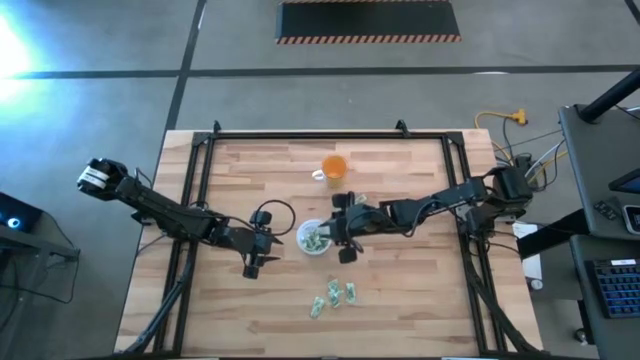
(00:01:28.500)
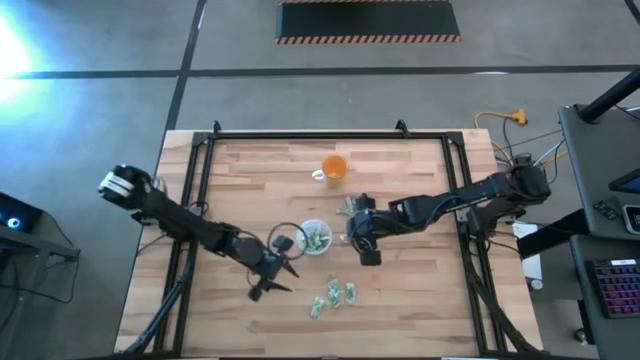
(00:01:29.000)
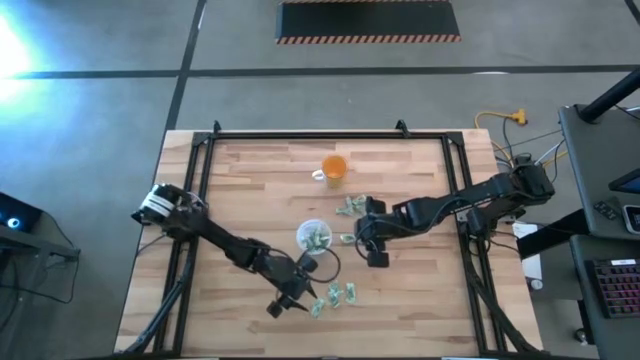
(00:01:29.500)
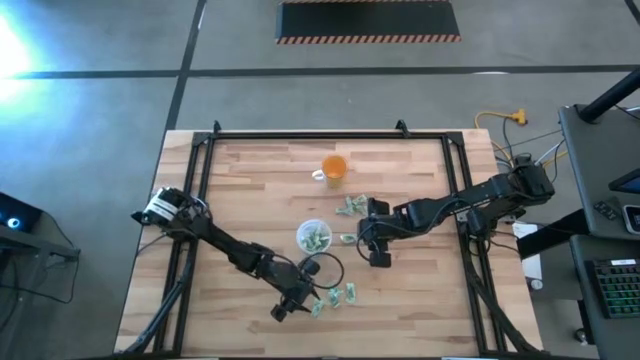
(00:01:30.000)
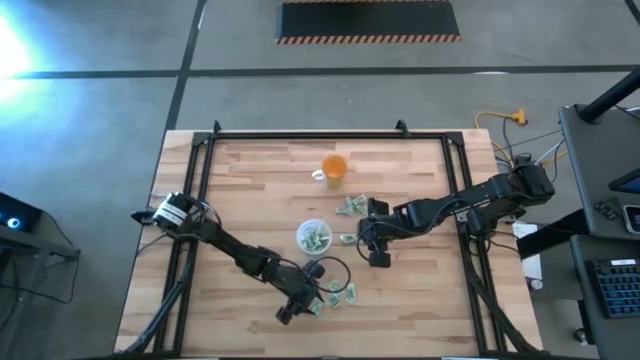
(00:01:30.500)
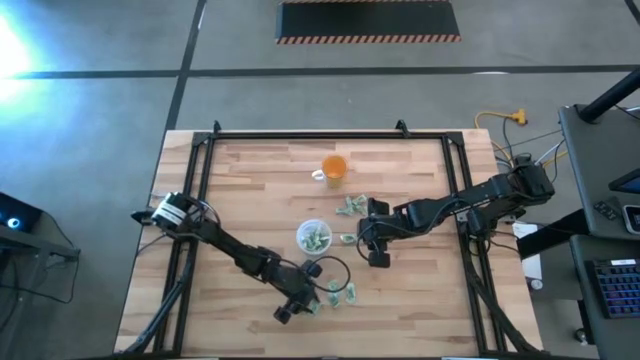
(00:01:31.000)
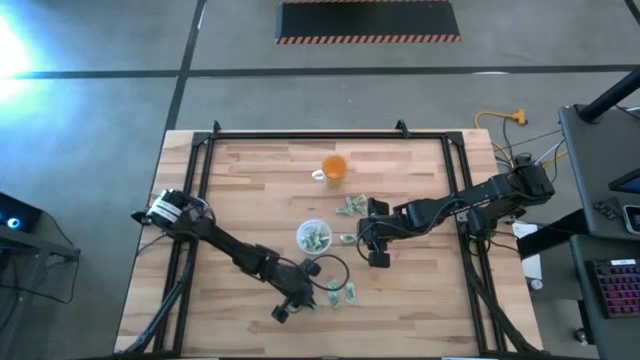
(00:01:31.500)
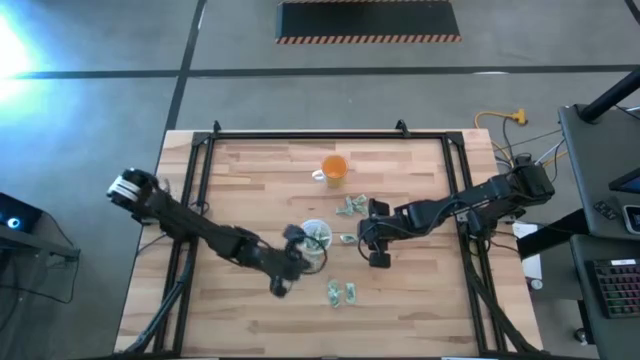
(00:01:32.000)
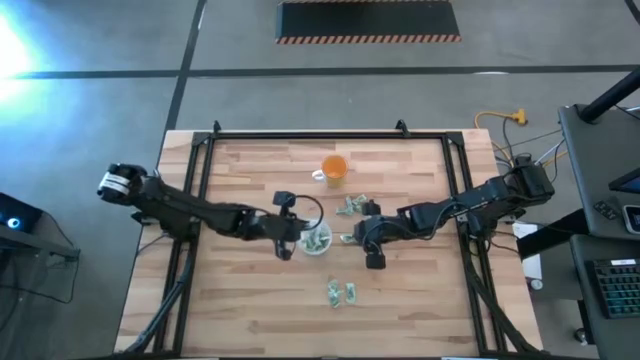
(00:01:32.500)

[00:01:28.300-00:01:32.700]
Task: Pick and place Stevia / Truvia into bins
Put the green stevia packet into the transparent container

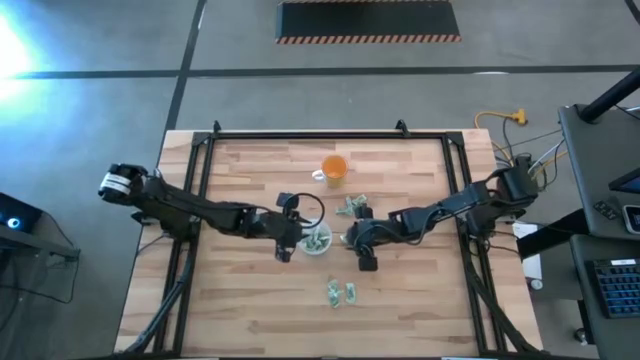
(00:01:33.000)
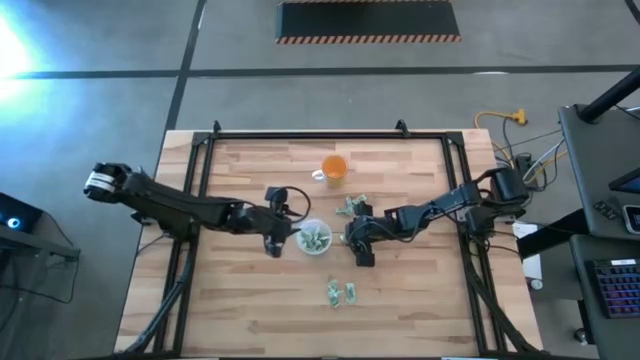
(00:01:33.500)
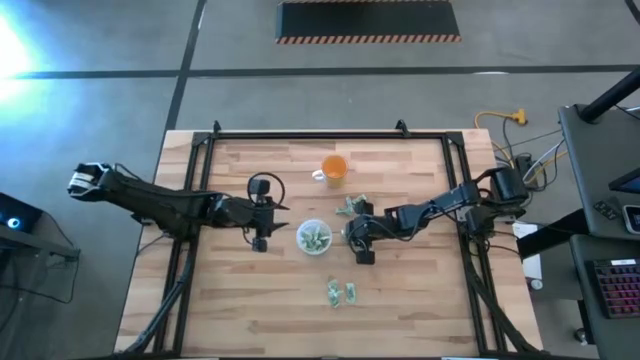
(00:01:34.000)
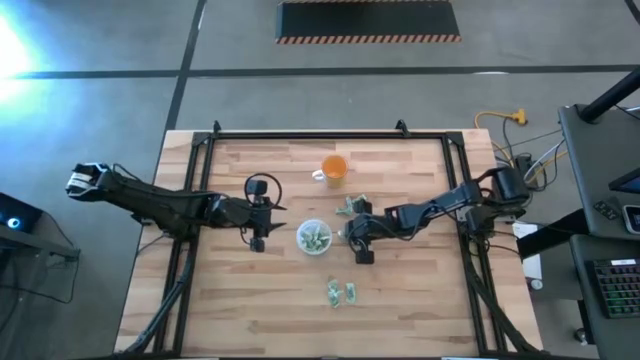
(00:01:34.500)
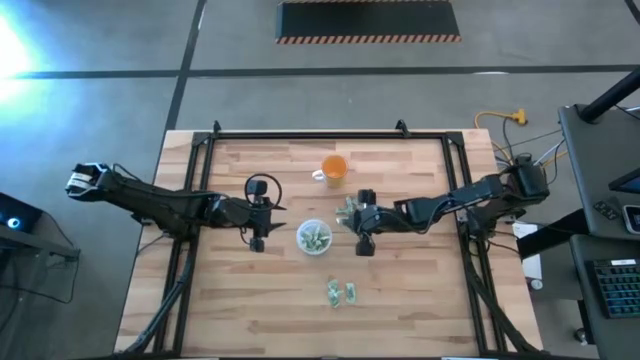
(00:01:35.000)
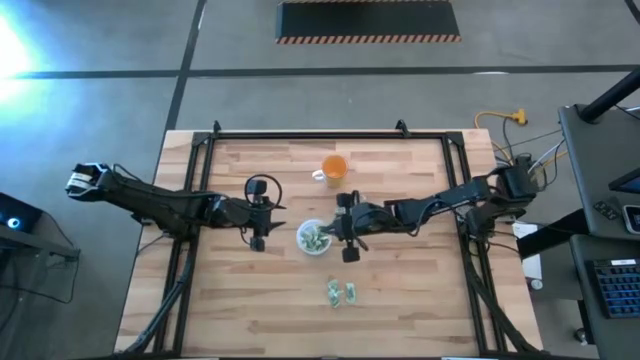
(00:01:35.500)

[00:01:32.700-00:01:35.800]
Put the green stevia packet into the transparent container

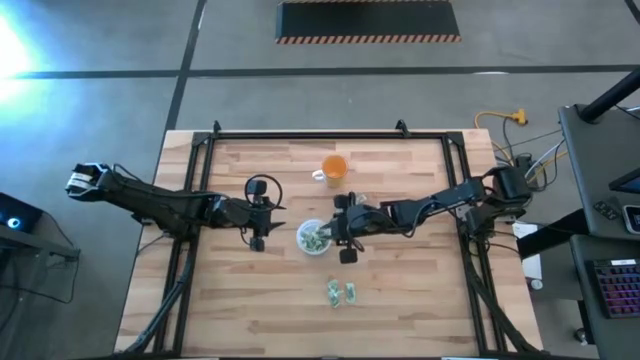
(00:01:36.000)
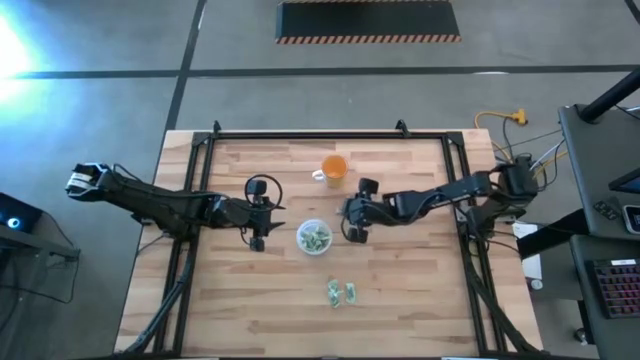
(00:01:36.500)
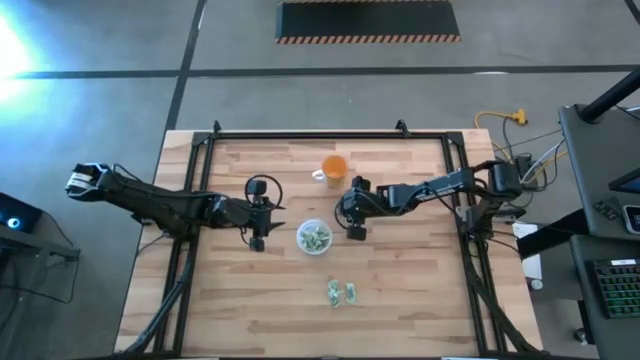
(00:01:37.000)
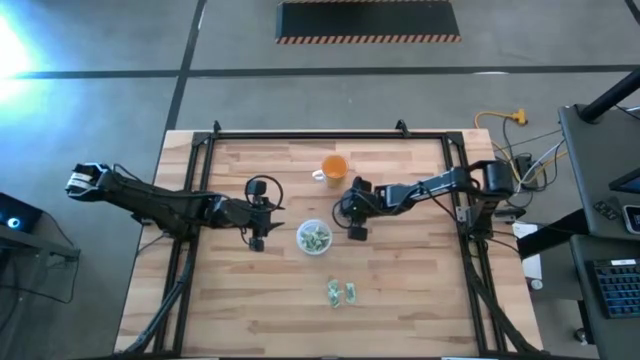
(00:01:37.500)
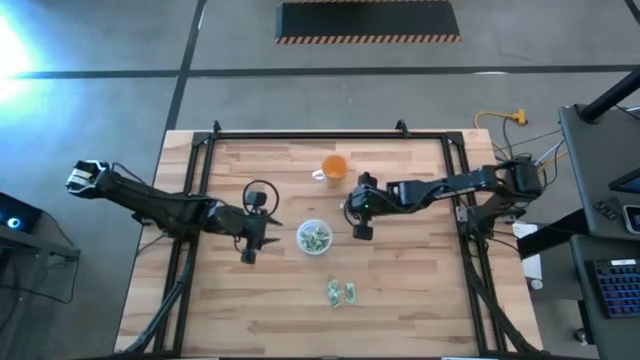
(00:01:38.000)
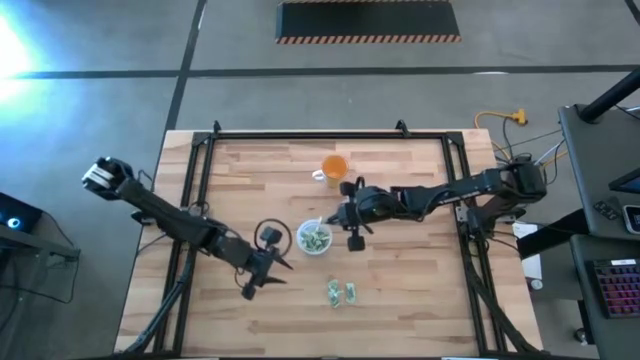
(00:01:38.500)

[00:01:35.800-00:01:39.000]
Put the green stevia packet into the transparent container

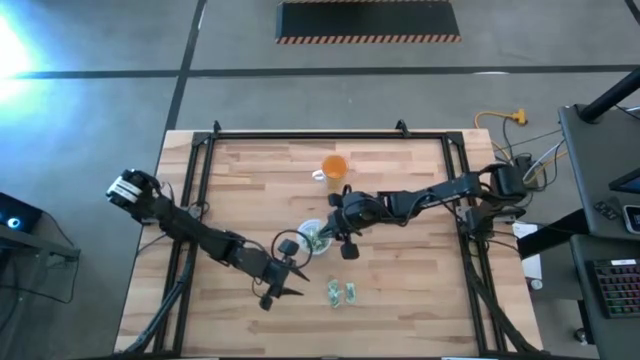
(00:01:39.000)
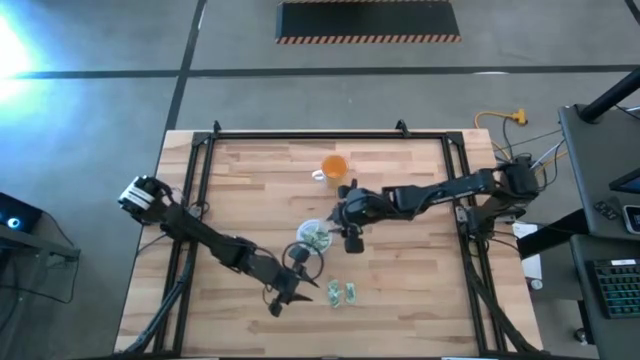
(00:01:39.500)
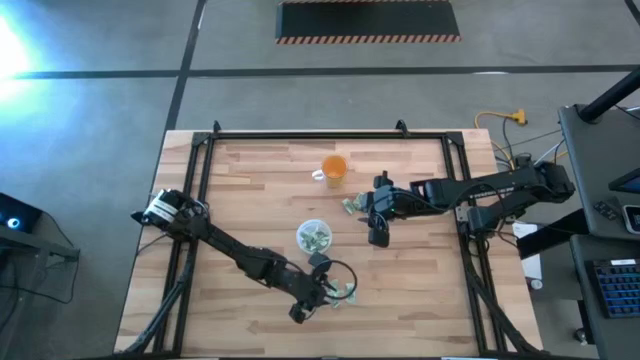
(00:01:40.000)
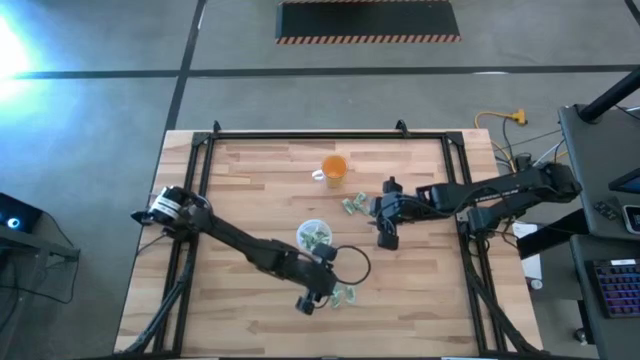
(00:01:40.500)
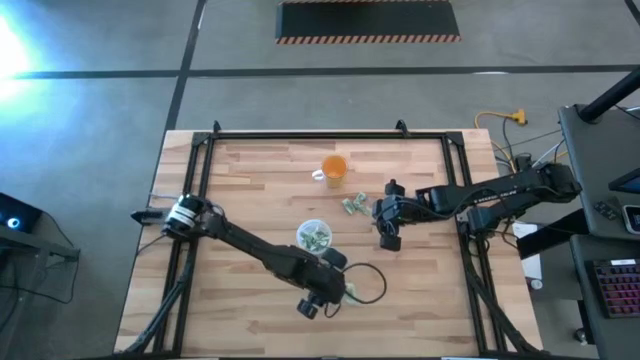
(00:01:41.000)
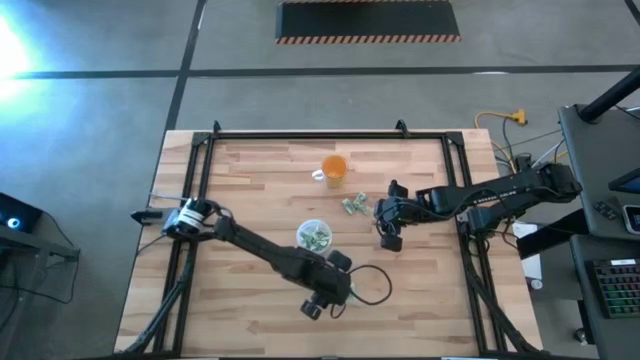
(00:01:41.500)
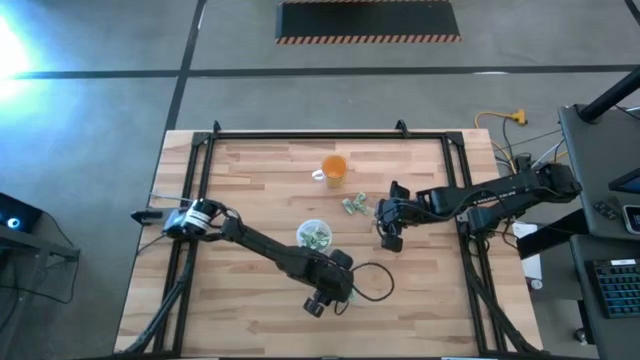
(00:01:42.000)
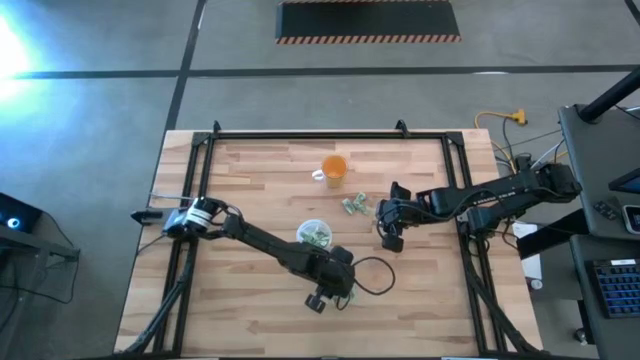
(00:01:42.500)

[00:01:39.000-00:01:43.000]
Put the green stevia packet into the transparent container

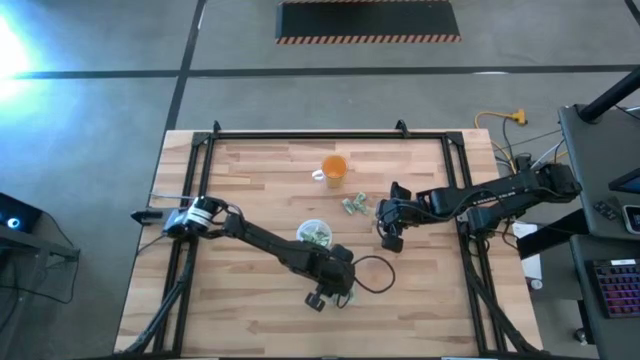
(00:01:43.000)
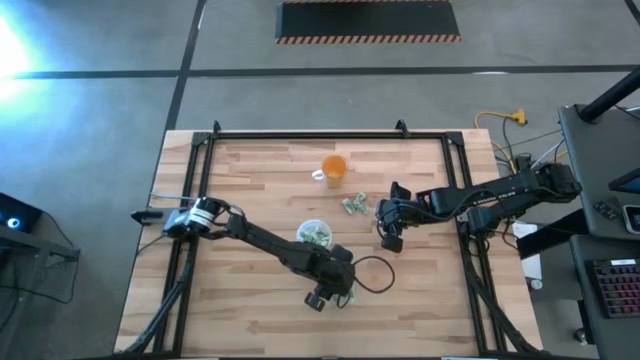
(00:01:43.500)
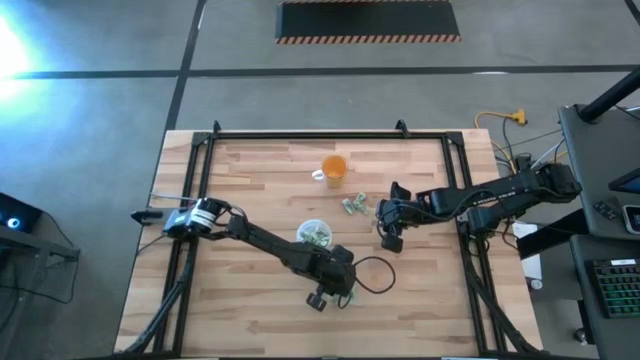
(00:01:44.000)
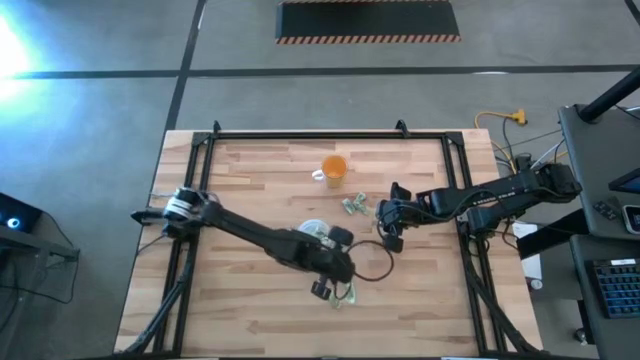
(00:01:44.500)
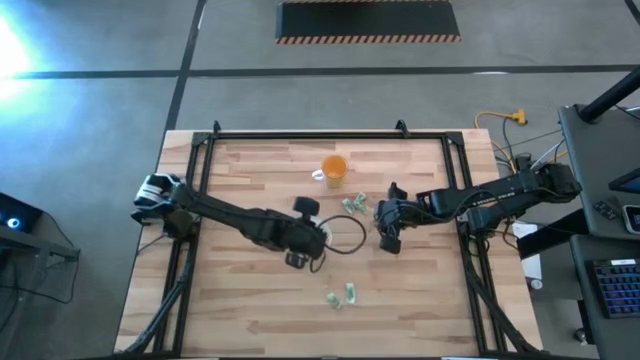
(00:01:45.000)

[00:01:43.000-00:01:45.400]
Put the green stevia packet into the transparent container

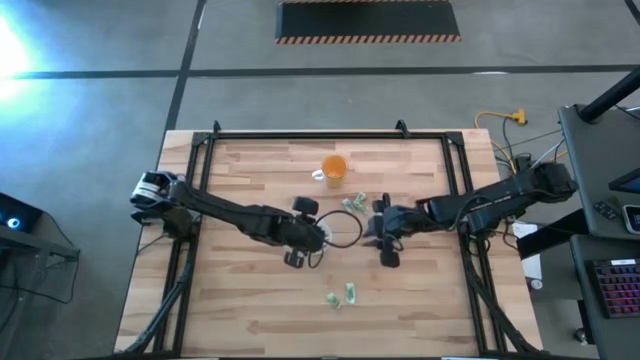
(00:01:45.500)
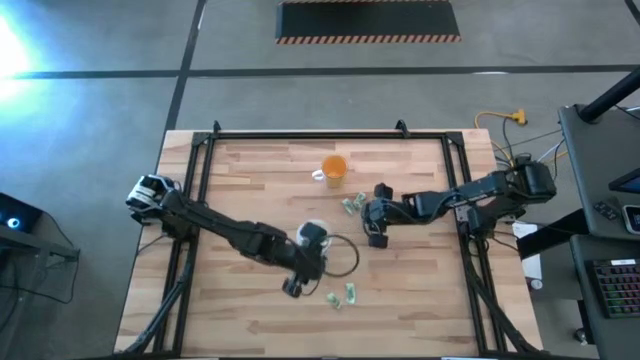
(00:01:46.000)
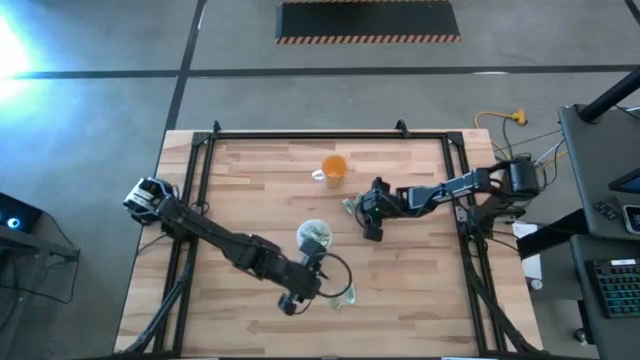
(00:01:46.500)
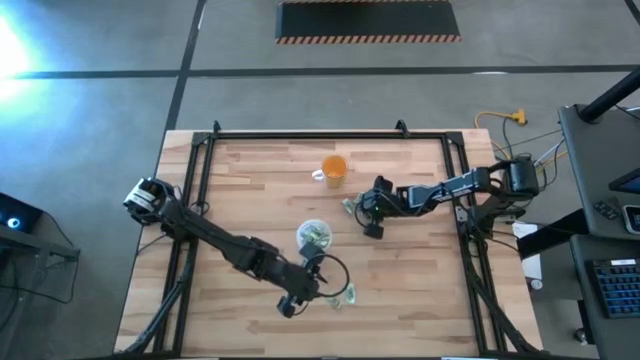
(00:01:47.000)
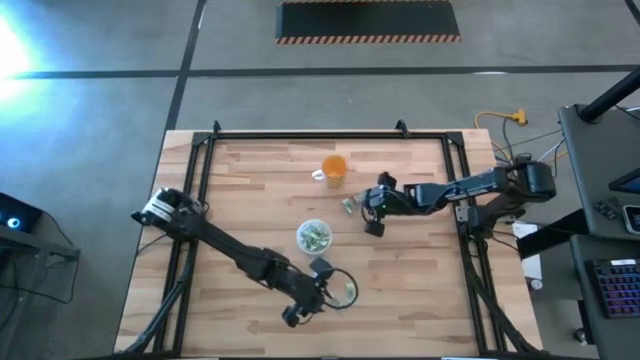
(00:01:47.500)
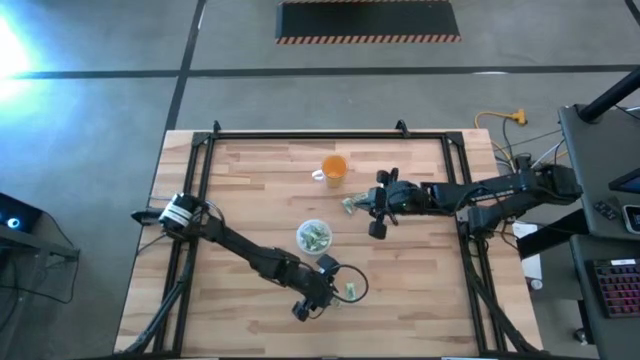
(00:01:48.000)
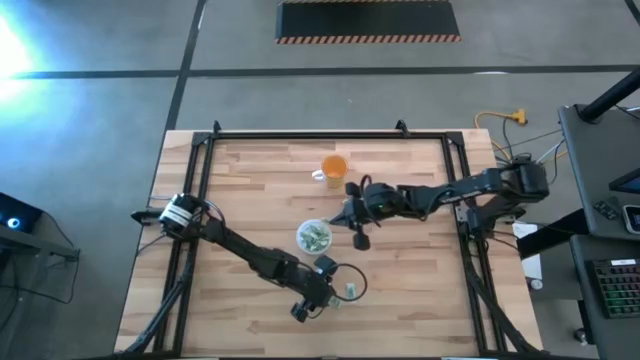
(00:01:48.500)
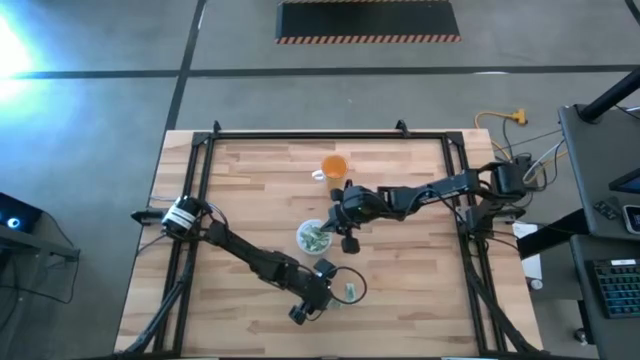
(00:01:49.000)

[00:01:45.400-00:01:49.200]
Put the green stevia packet into the transparent container

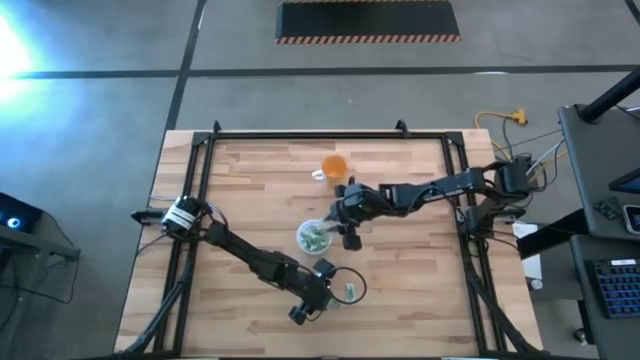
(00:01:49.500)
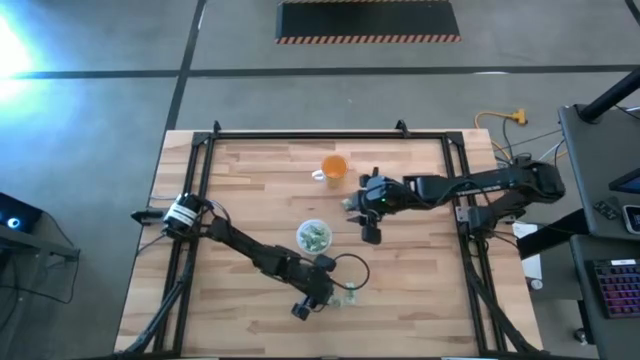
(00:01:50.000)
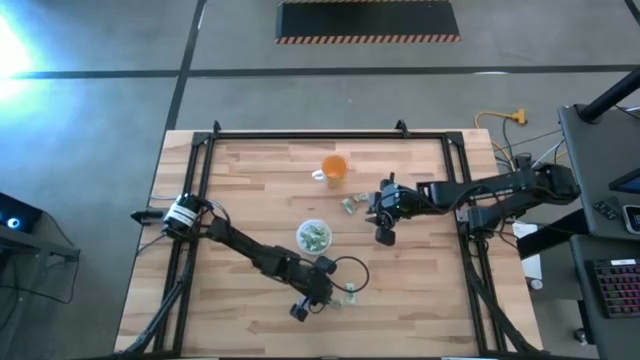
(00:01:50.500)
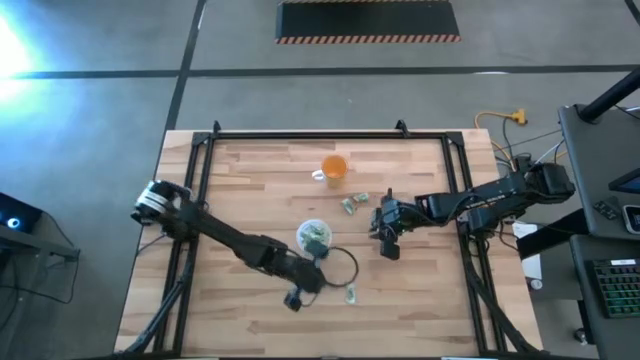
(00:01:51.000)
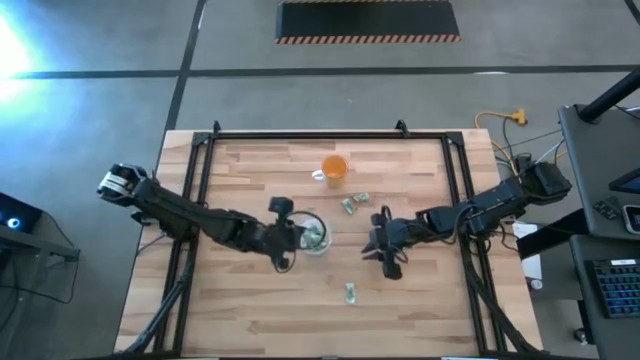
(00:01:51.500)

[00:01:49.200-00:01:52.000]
Put the green stevia packet into the transparent container
